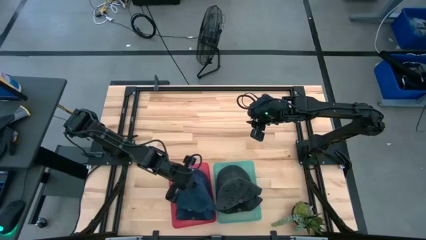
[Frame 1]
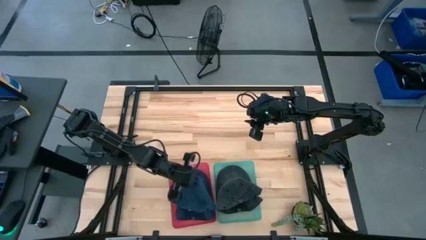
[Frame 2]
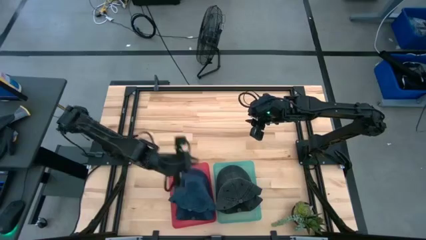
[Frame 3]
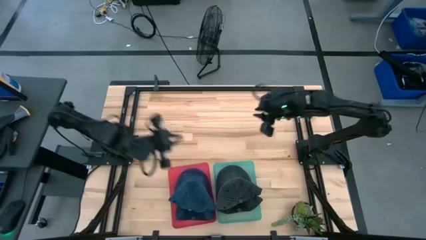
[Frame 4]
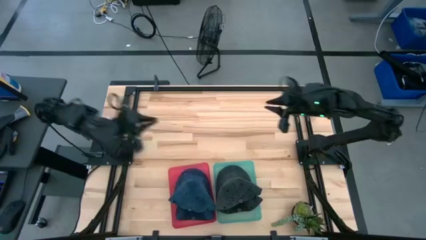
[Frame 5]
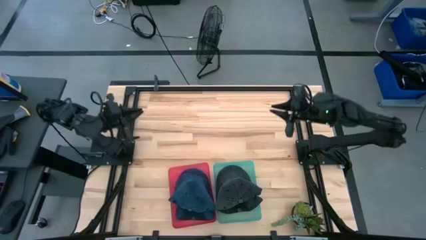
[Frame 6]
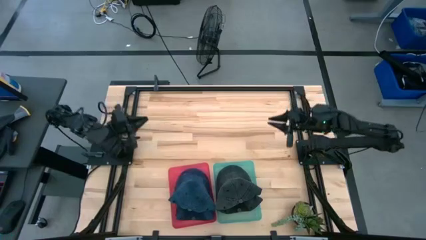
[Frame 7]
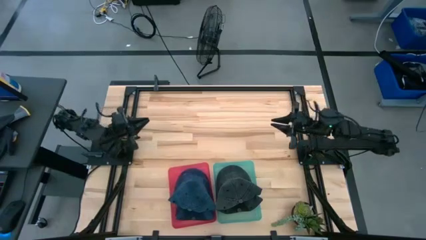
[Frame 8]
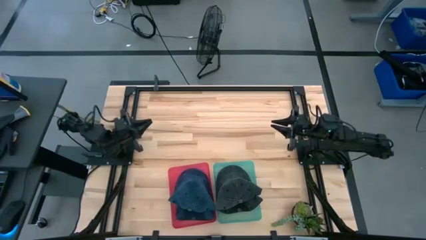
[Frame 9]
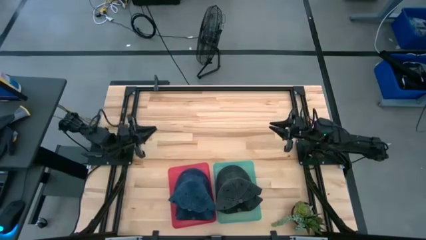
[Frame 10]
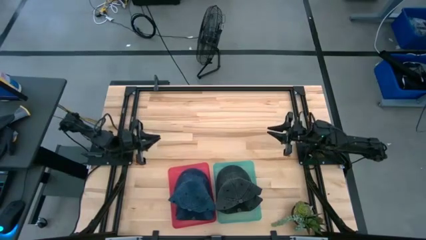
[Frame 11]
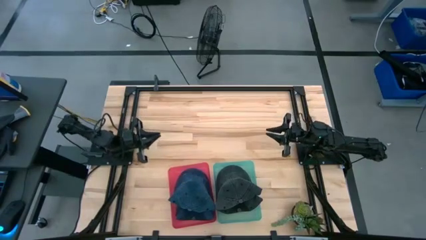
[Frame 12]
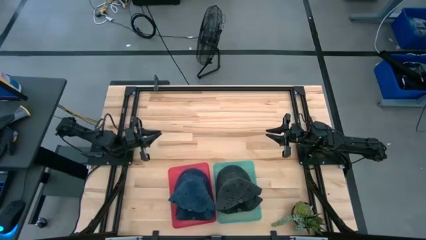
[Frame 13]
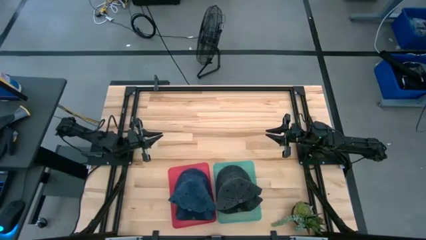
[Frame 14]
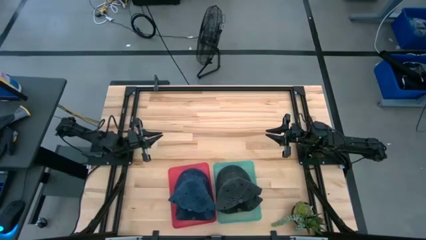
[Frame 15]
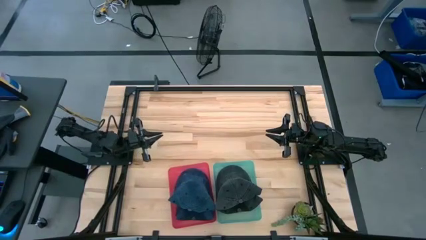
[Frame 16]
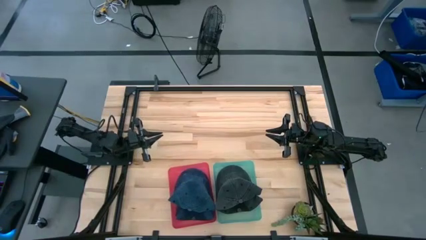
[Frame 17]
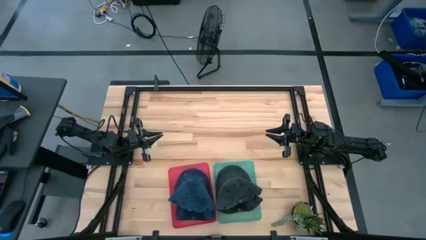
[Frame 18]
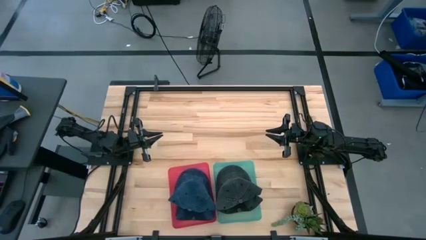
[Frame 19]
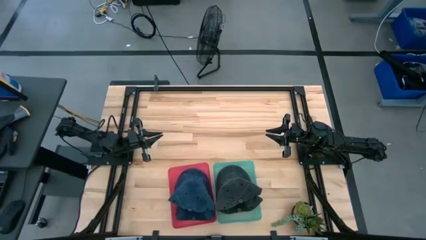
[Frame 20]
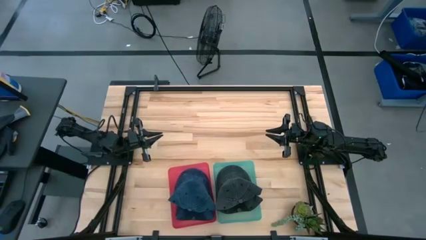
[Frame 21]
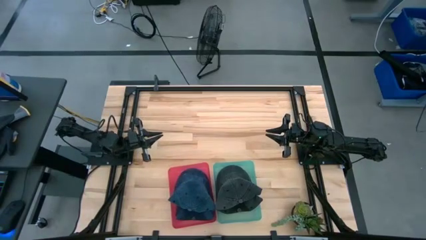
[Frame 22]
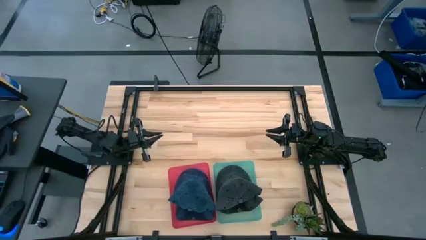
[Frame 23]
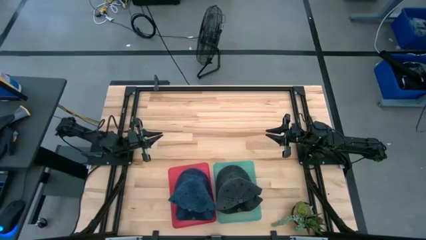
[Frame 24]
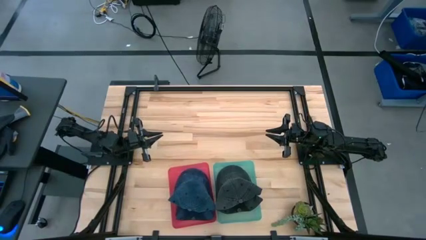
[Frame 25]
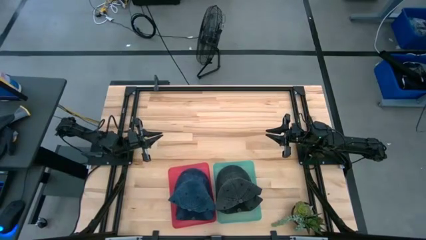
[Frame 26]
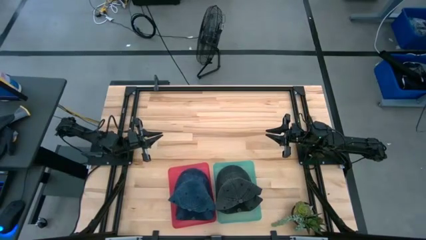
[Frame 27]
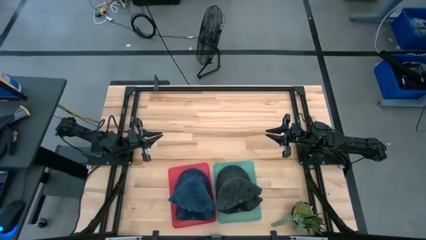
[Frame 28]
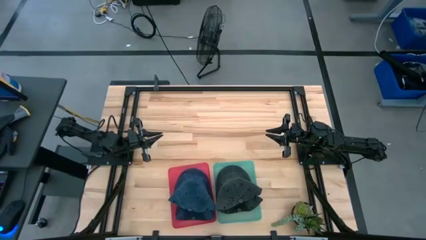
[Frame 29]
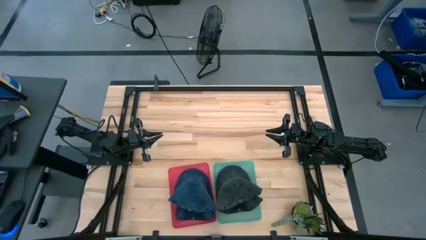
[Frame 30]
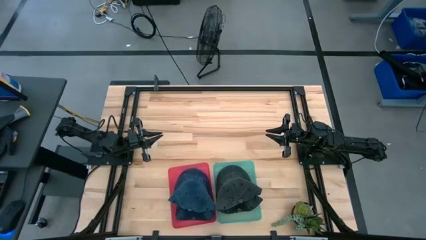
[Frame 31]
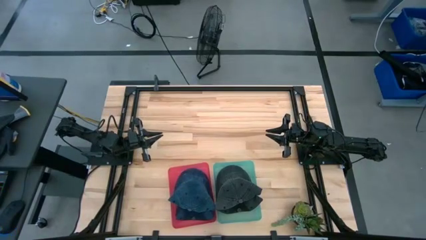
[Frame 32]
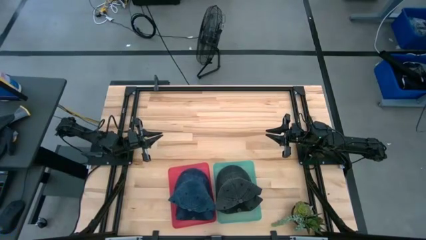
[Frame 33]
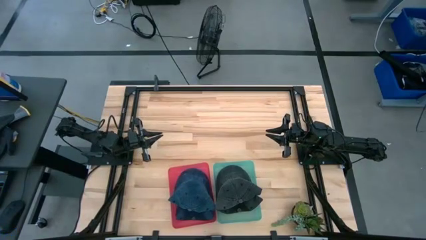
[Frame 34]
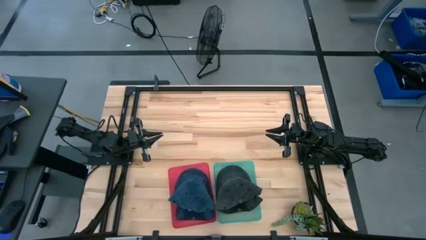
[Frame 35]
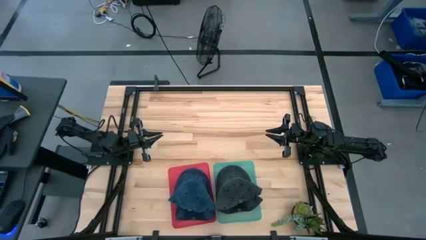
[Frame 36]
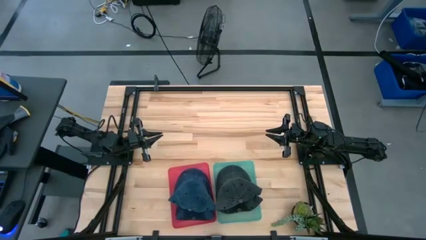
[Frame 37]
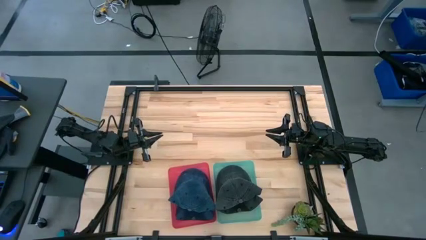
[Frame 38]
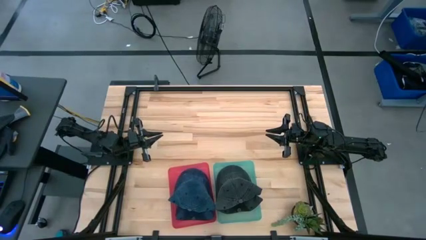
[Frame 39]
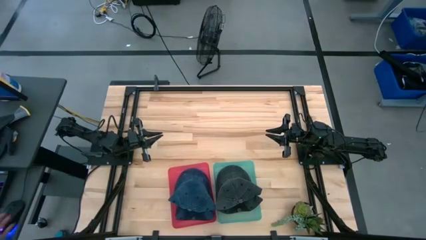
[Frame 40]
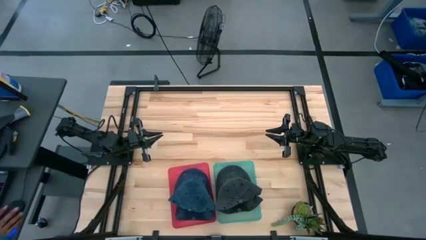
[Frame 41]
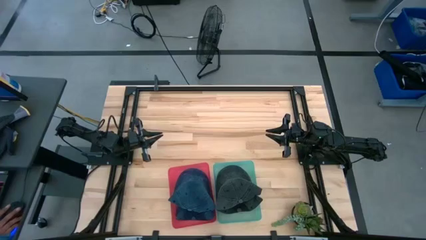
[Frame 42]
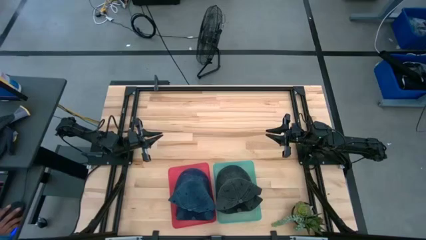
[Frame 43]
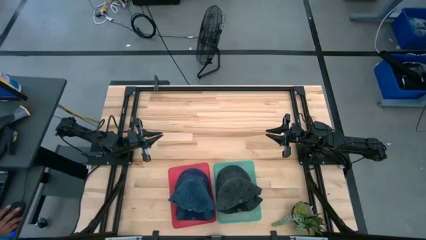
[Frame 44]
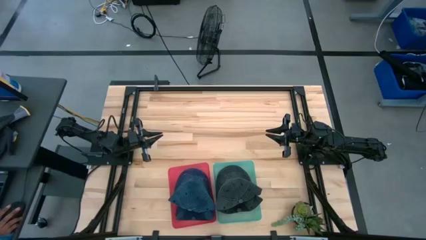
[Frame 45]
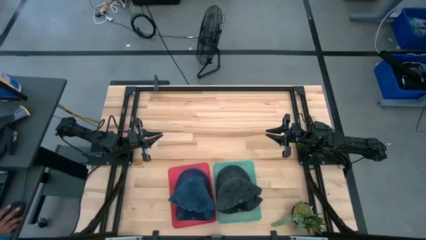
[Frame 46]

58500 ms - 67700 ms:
Task: Pick & Place hat
Return to Home Position

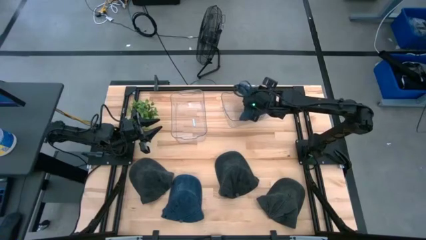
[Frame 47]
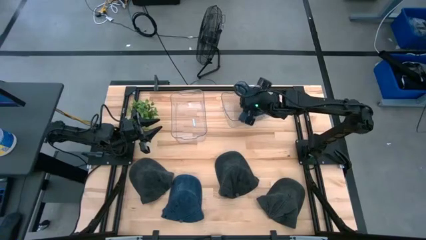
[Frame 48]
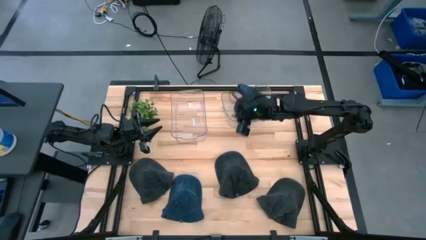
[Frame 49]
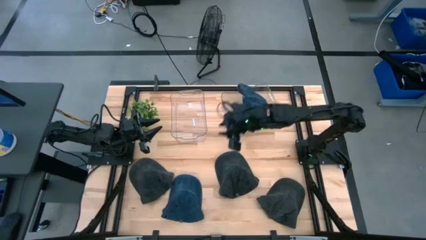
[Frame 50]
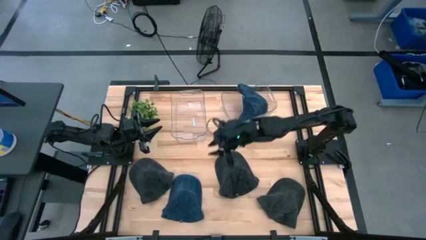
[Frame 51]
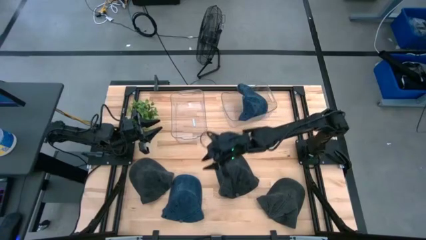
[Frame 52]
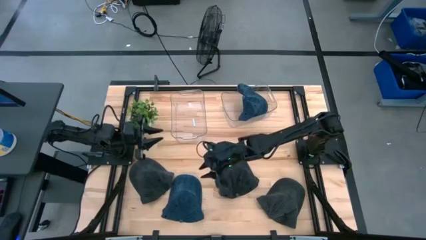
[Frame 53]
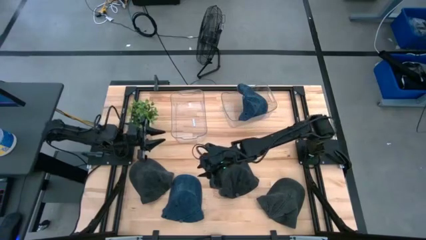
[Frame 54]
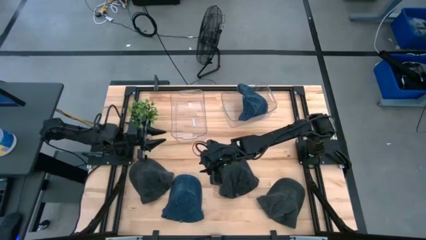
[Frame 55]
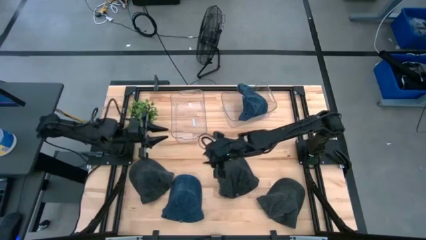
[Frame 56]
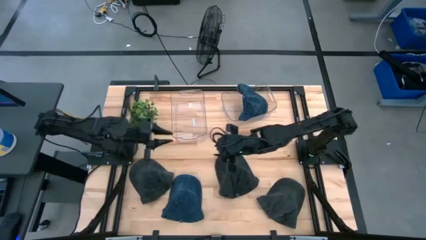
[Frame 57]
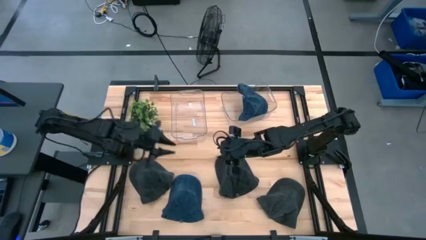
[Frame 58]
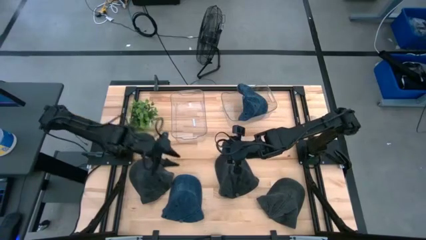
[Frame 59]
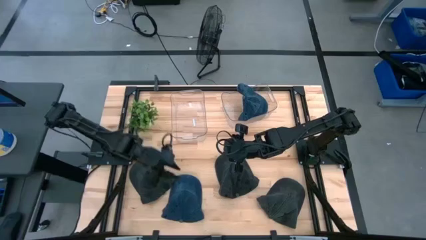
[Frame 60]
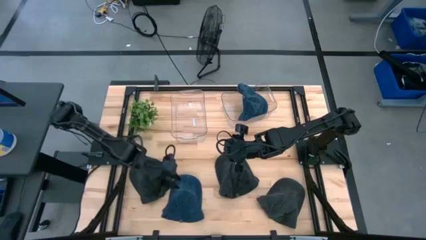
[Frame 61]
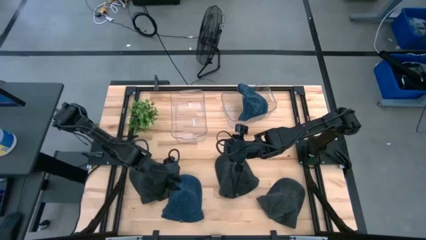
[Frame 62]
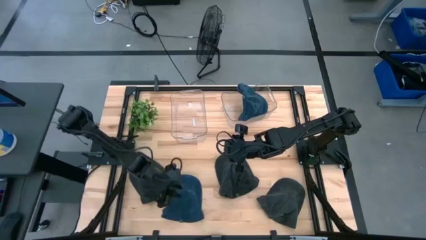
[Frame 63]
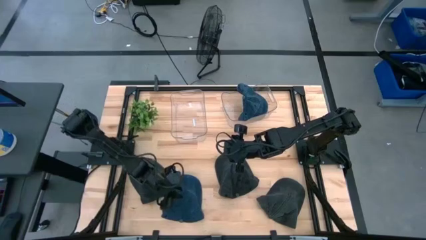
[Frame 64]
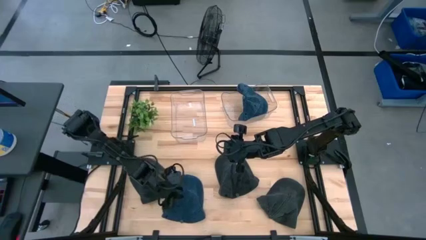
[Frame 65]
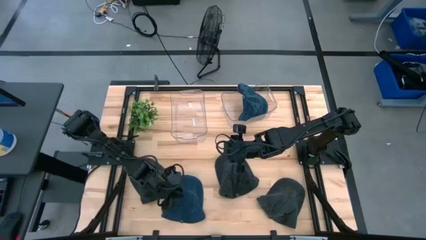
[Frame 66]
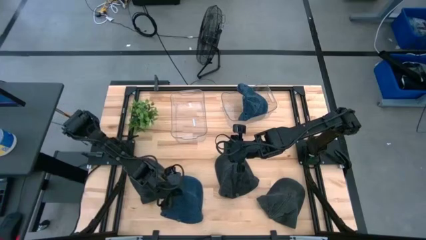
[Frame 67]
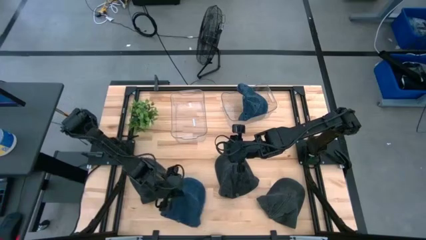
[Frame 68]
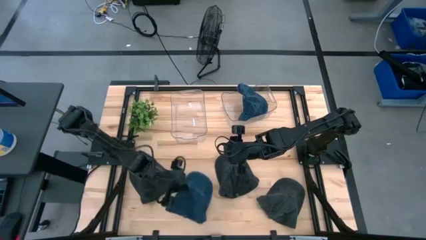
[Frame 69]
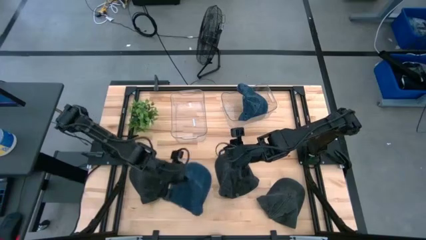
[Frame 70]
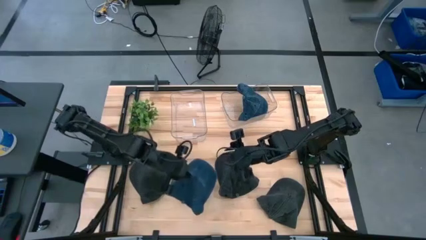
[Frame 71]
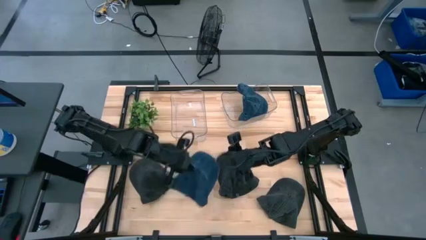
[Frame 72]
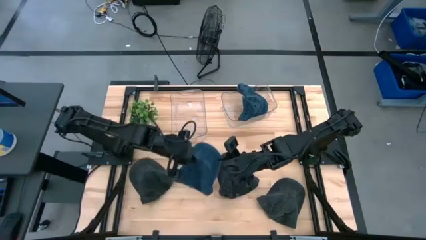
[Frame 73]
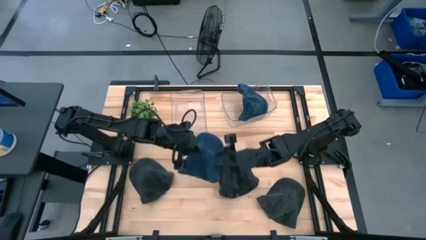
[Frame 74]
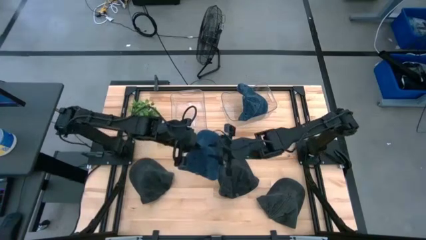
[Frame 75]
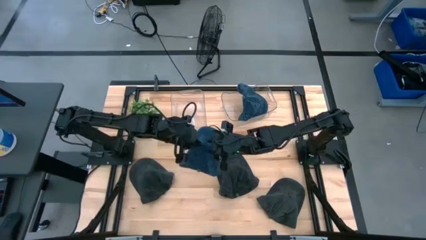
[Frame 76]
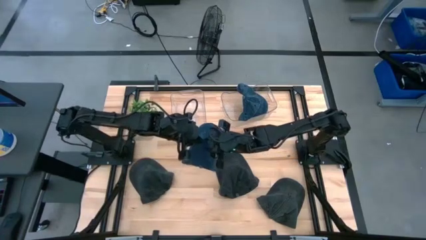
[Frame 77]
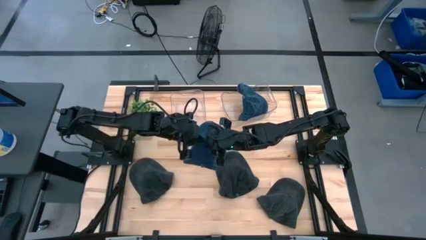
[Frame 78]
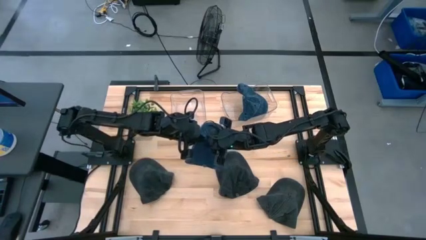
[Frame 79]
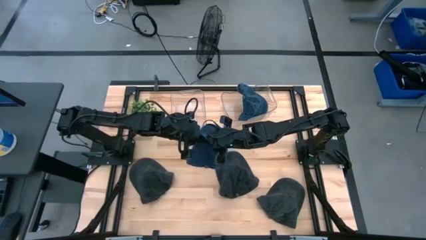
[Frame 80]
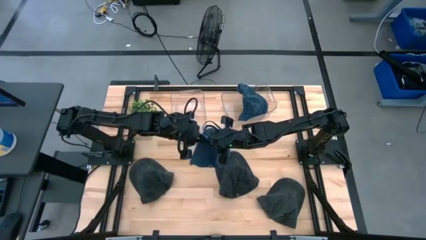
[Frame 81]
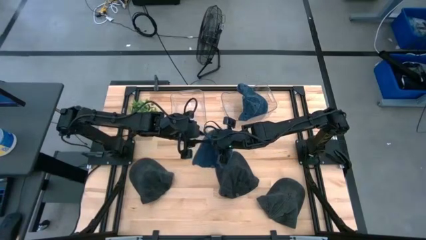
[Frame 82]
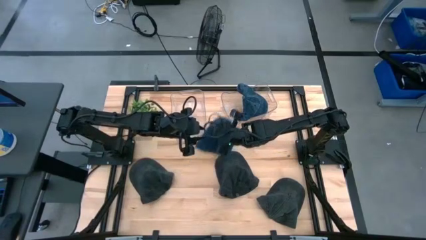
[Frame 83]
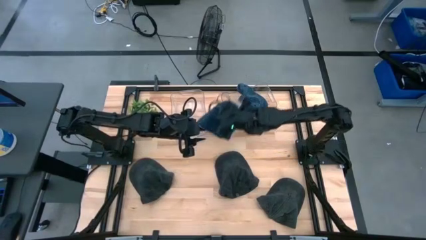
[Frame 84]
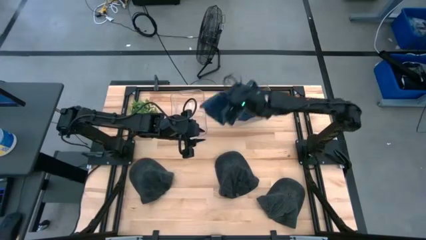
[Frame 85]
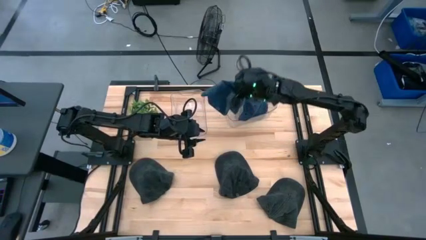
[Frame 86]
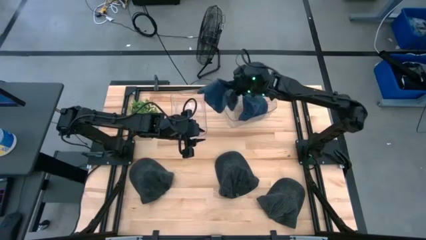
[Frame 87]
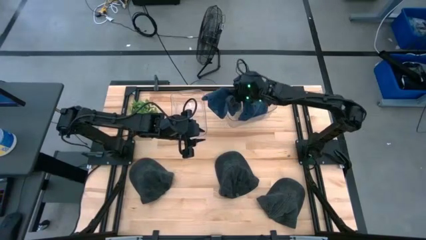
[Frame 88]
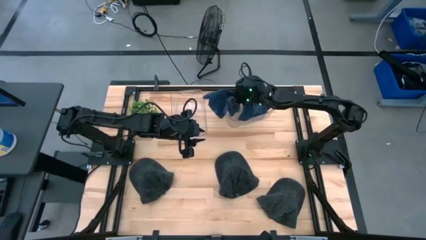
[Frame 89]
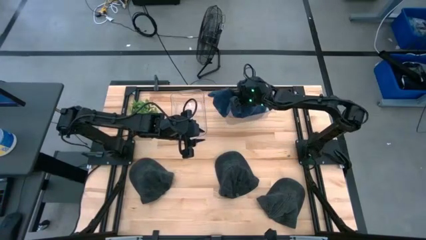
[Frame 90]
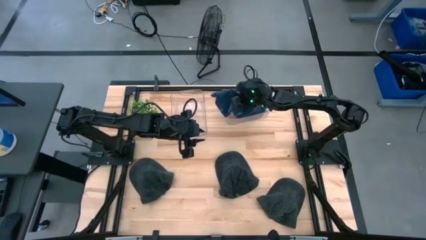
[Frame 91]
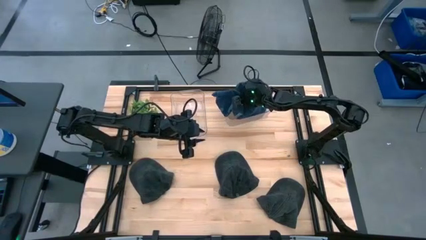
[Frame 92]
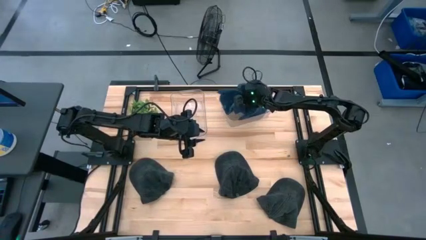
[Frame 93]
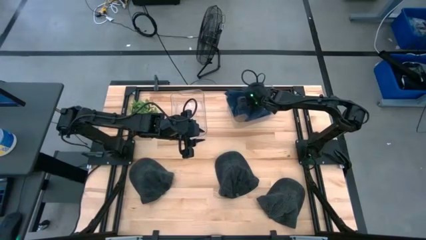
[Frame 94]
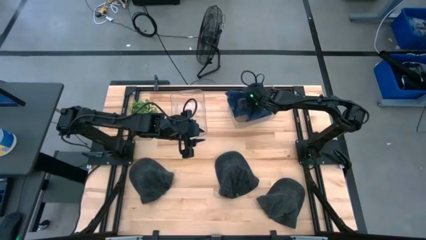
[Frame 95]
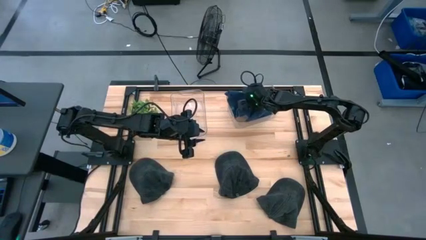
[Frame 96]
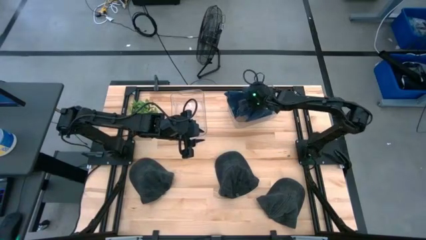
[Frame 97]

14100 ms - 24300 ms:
Task: Pick & Place hat
Put the blue cap into the right transparent bin
